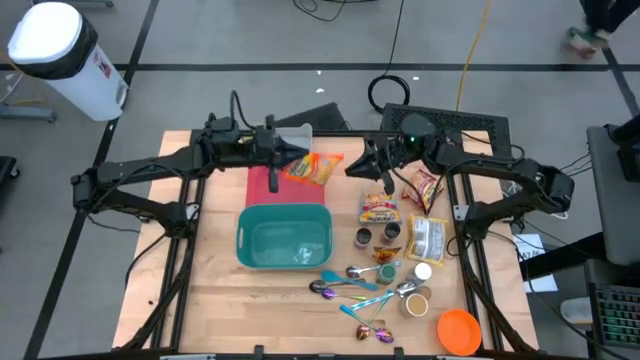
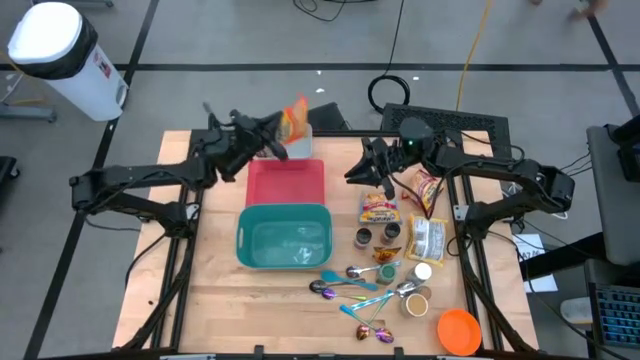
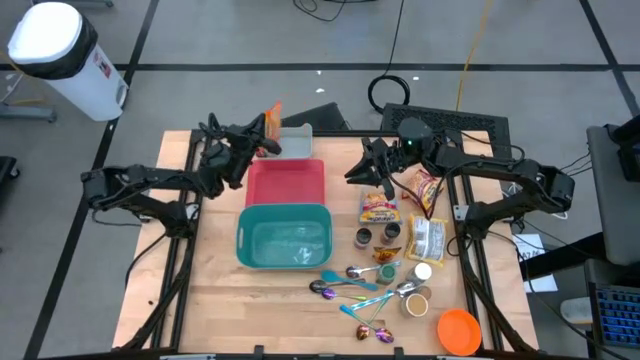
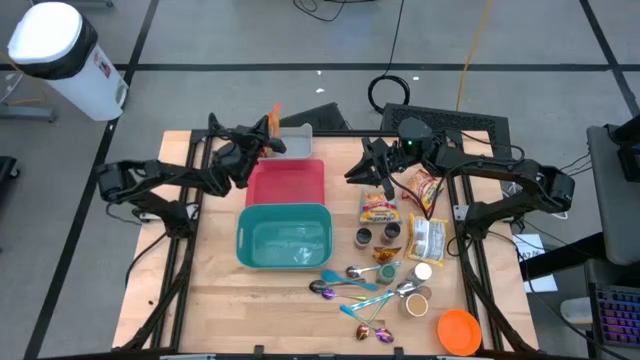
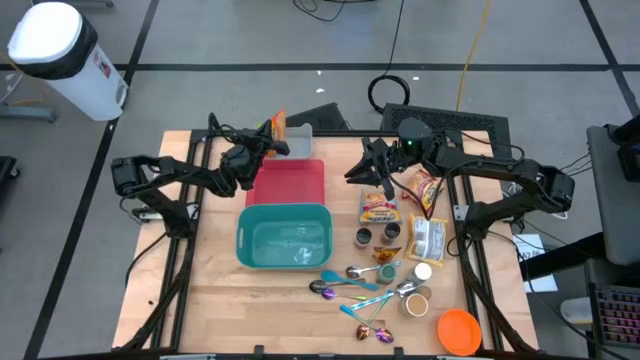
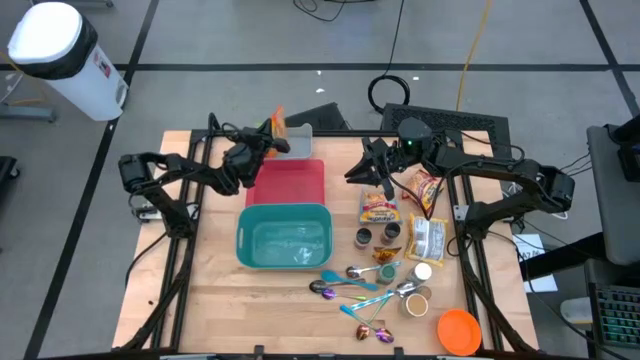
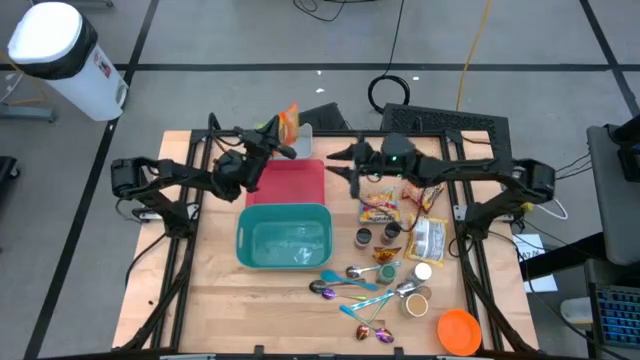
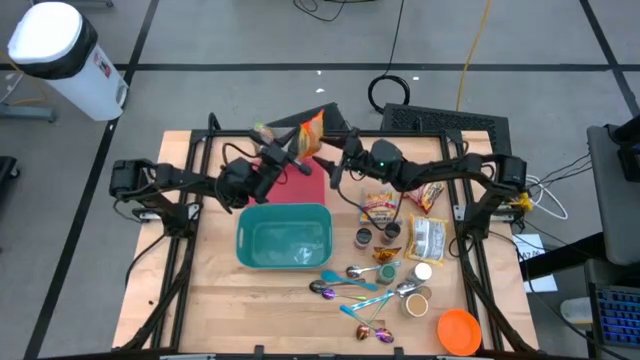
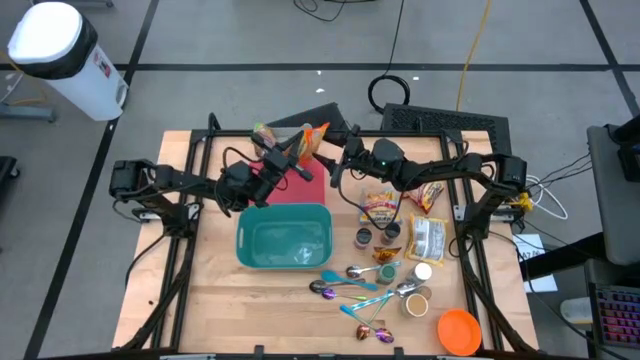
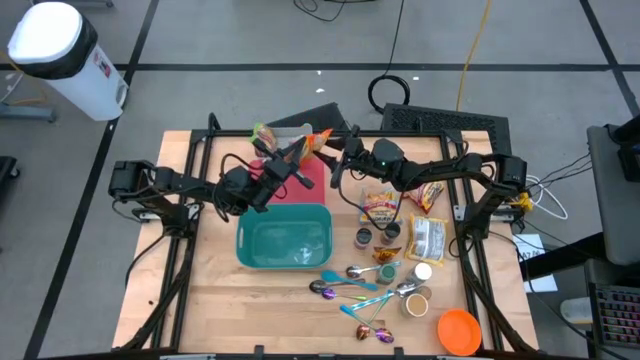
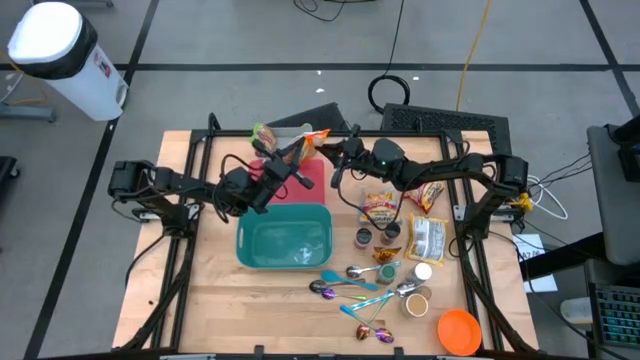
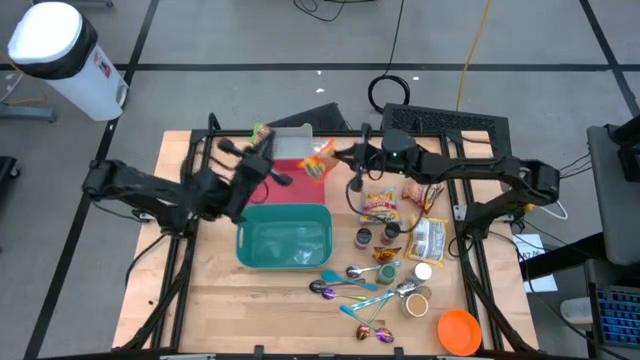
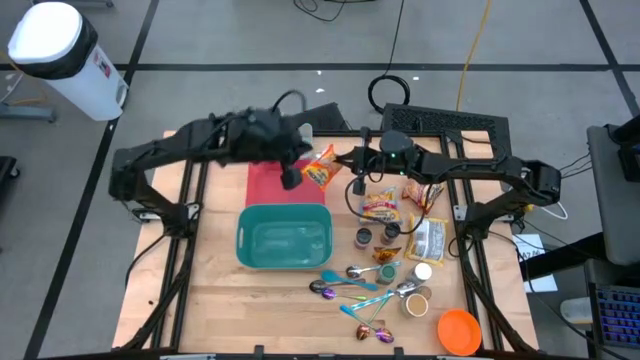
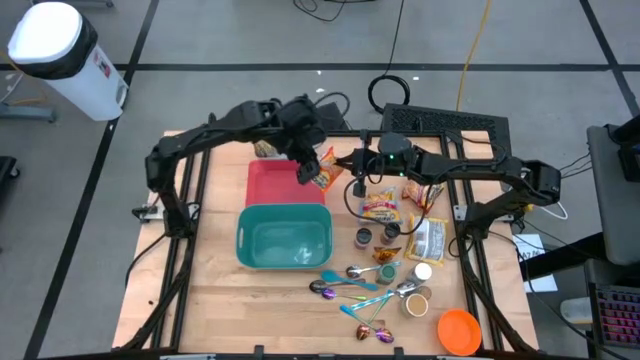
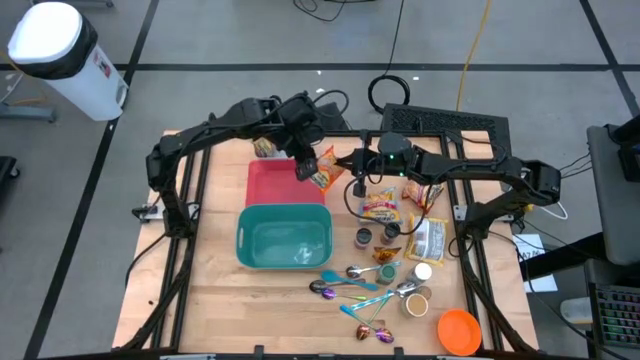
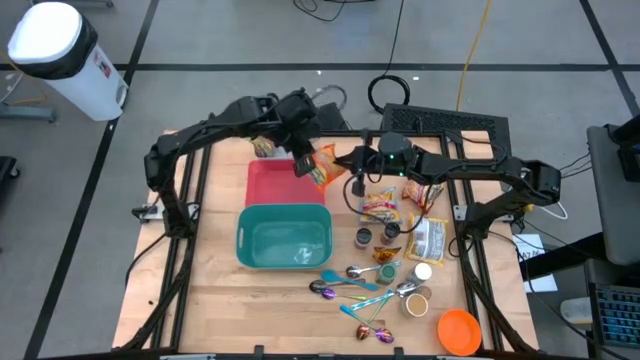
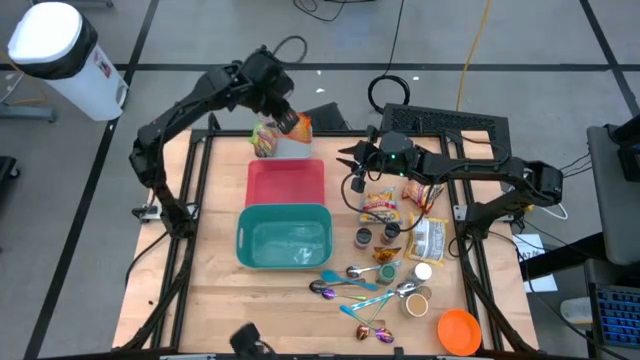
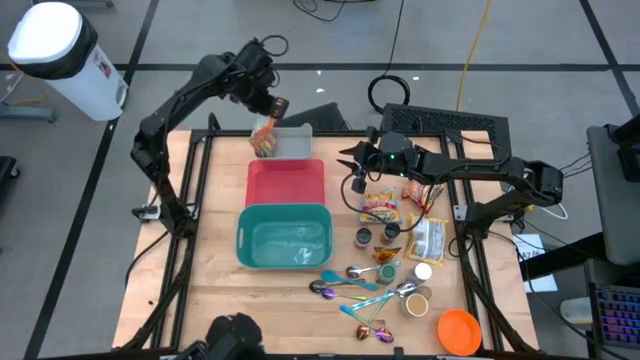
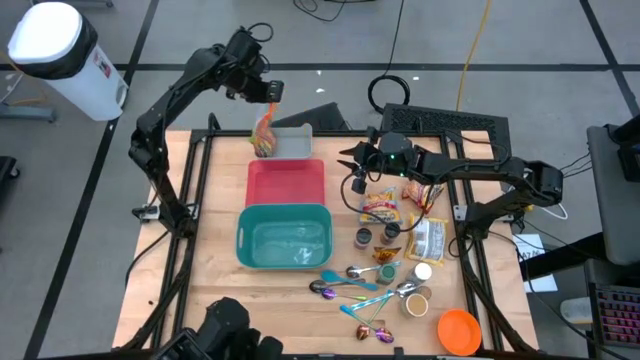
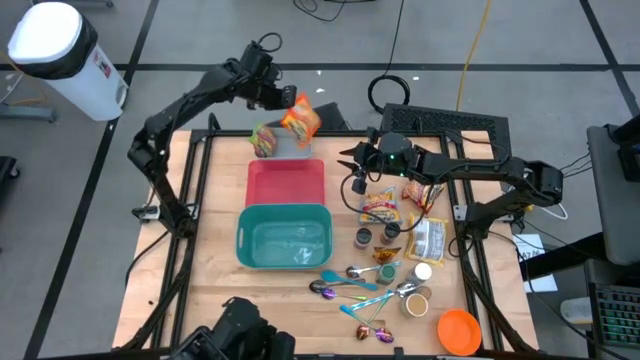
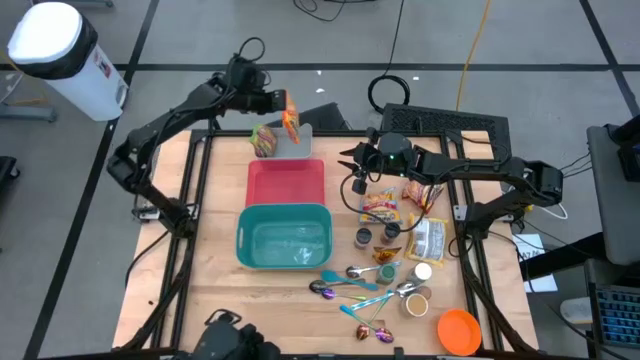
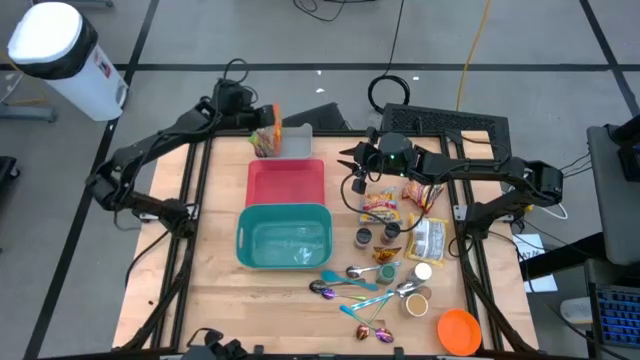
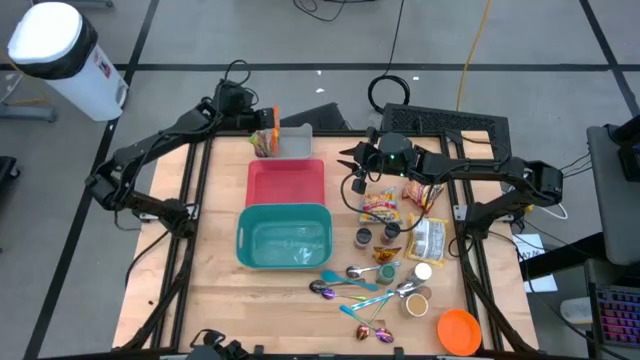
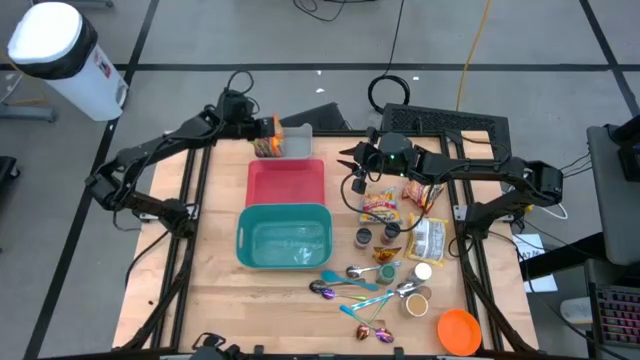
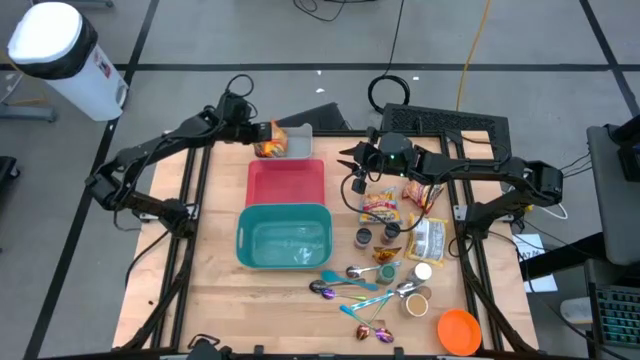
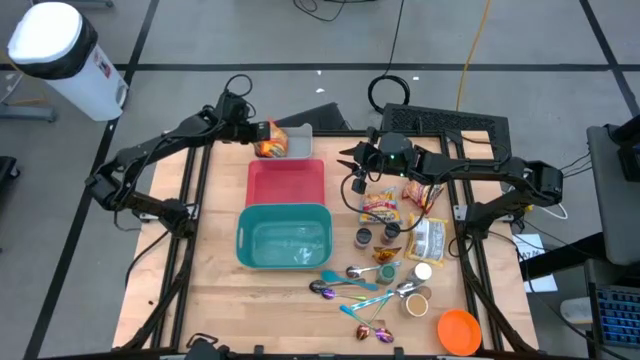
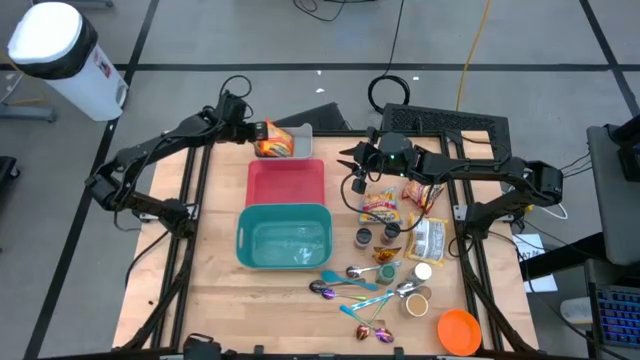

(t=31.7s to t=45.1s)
Task: Pick & Place Food Item
Put the orange noodle pack into the gray bin

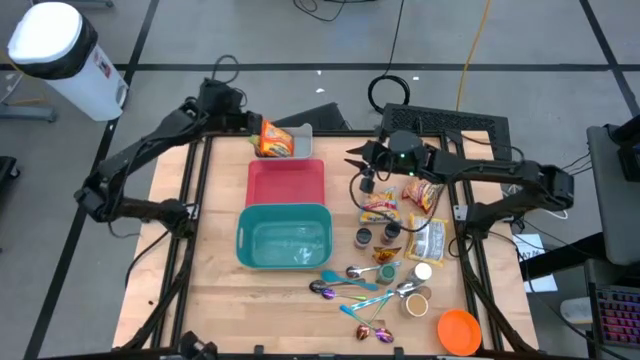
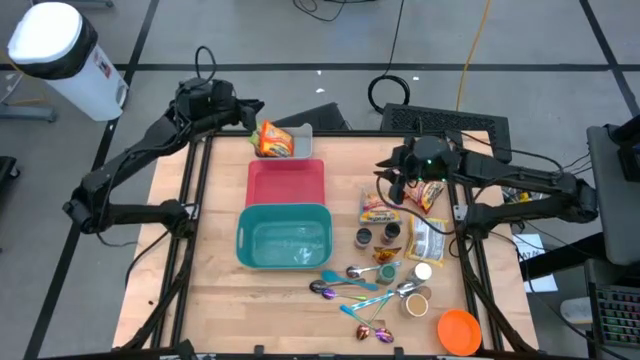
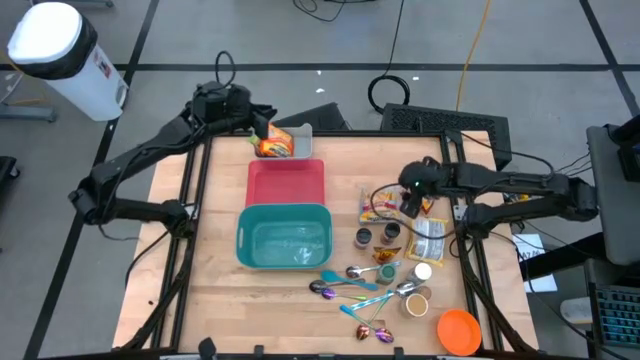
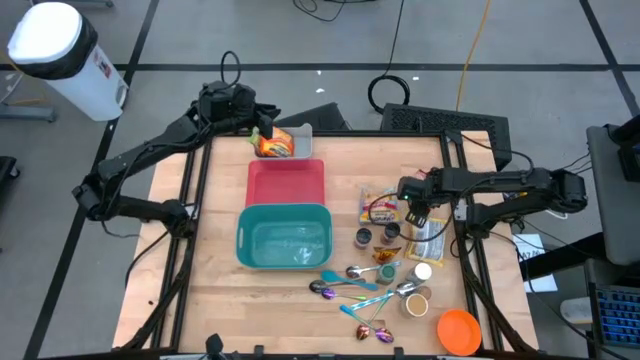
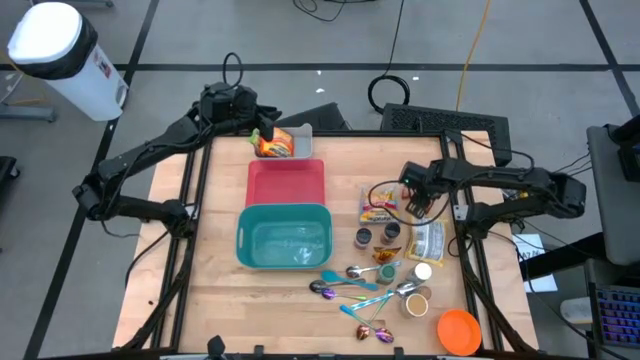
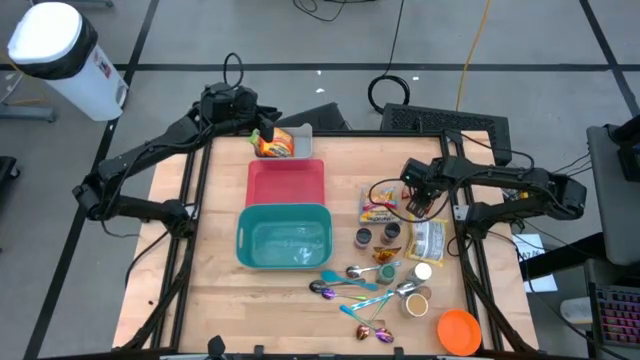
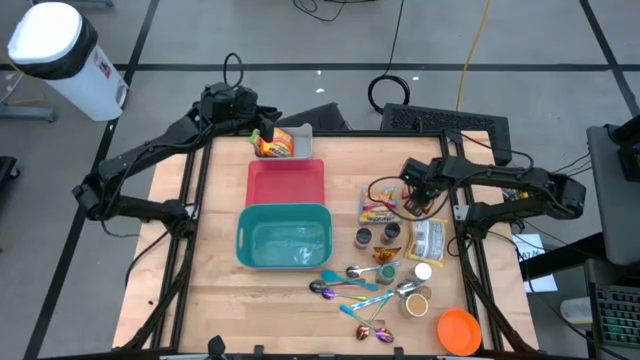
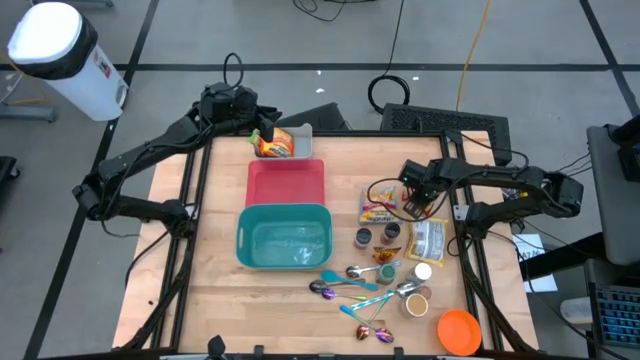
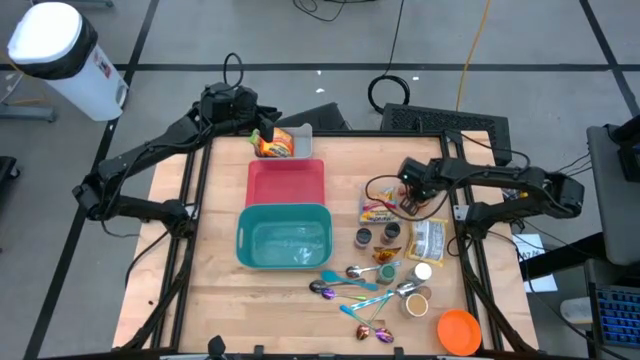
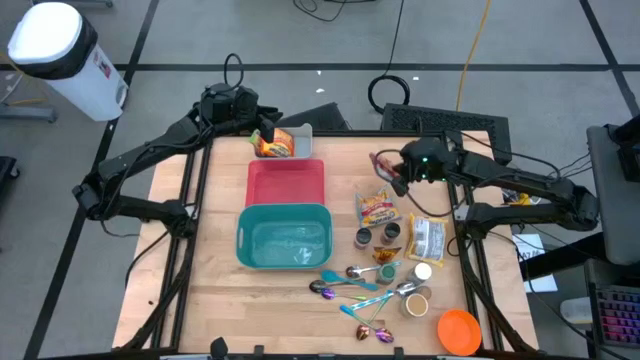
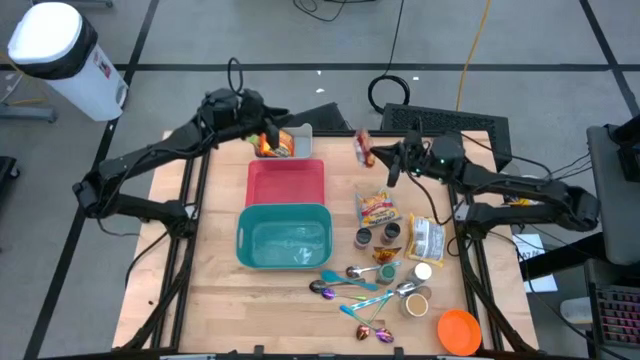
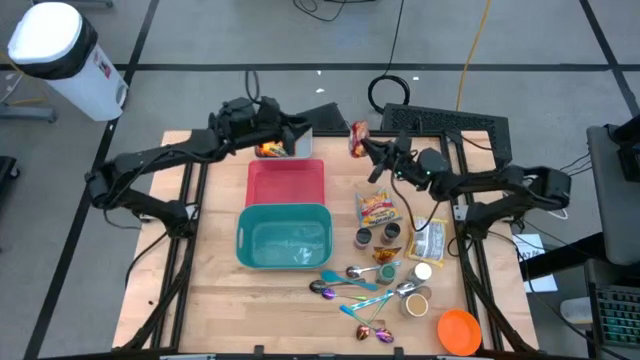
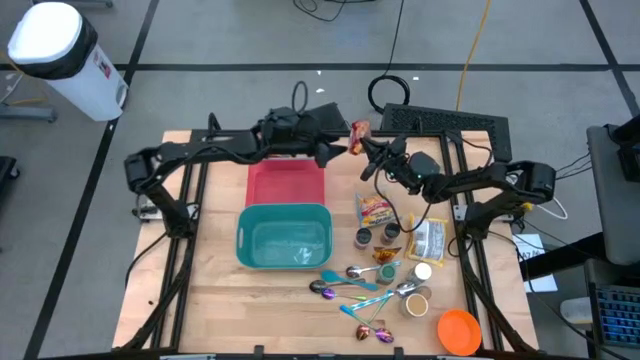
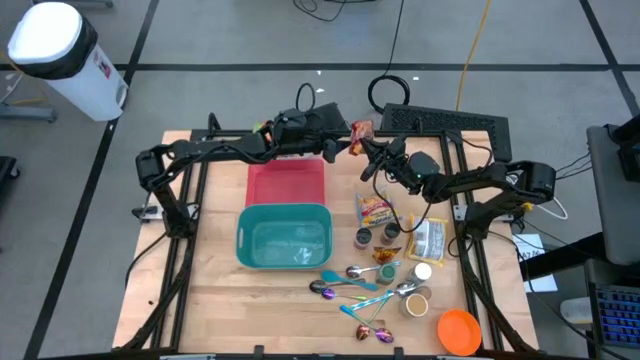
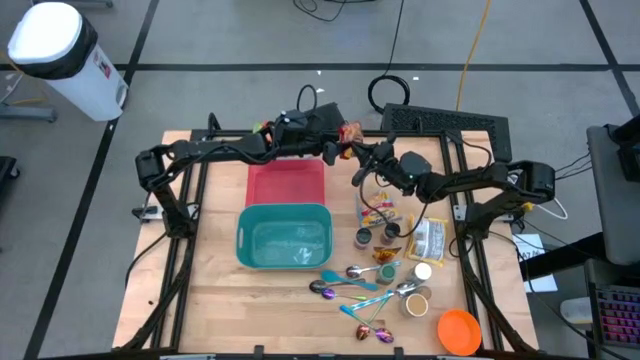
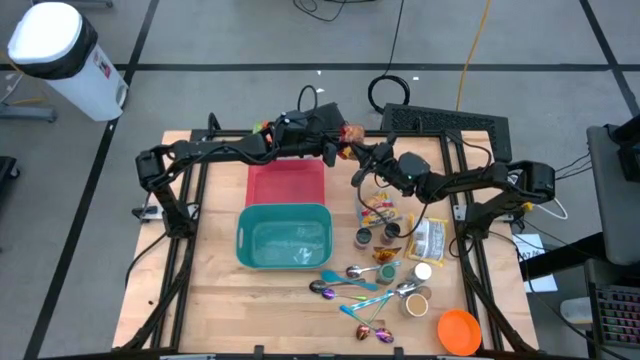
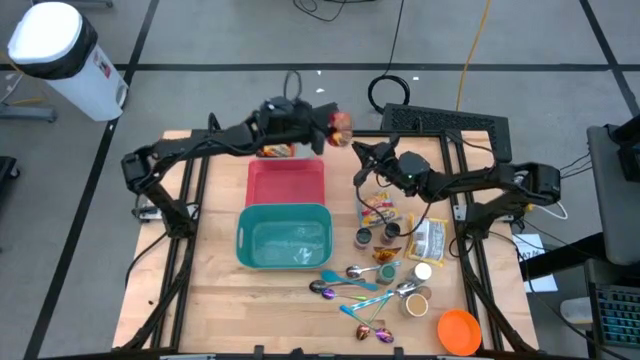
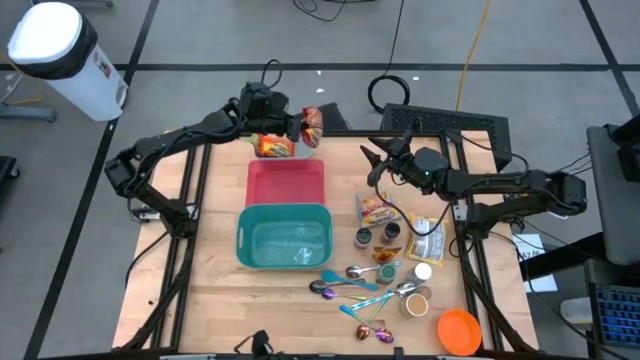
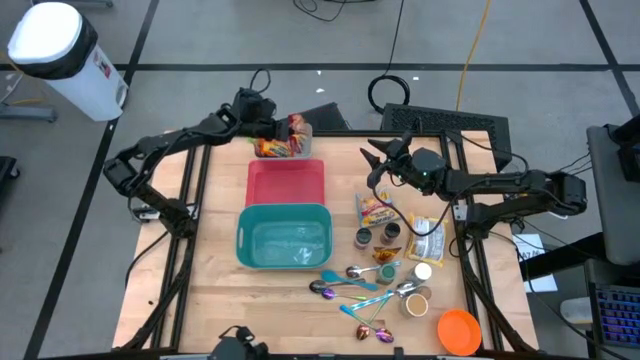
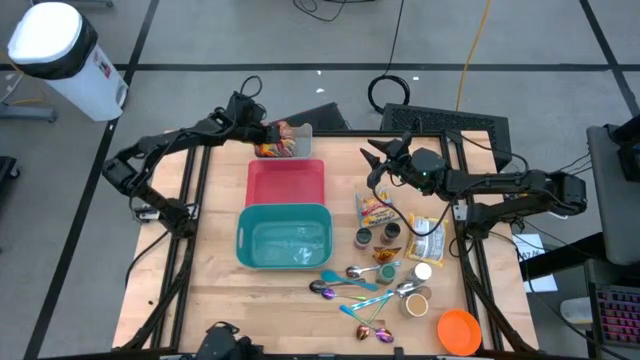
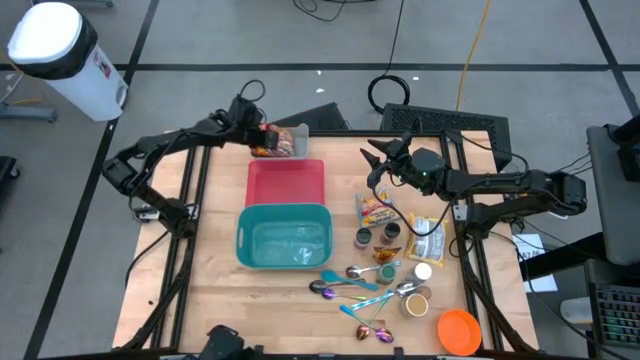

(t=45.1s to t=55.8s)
Put the red noodle pack into the gray bin
